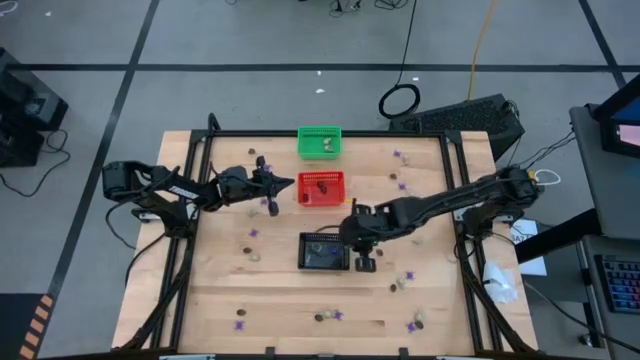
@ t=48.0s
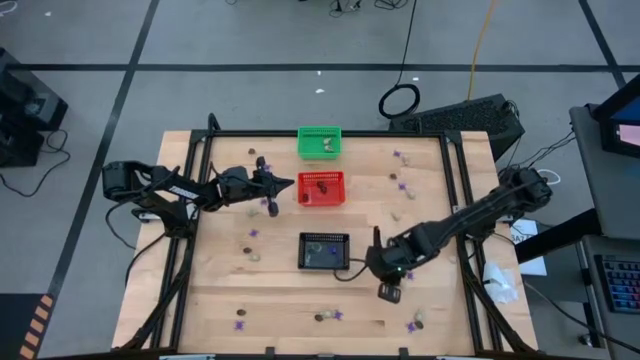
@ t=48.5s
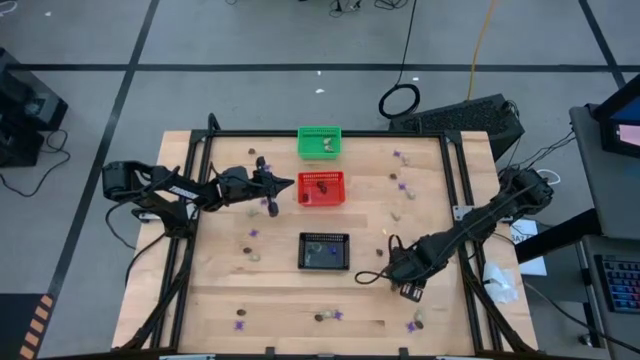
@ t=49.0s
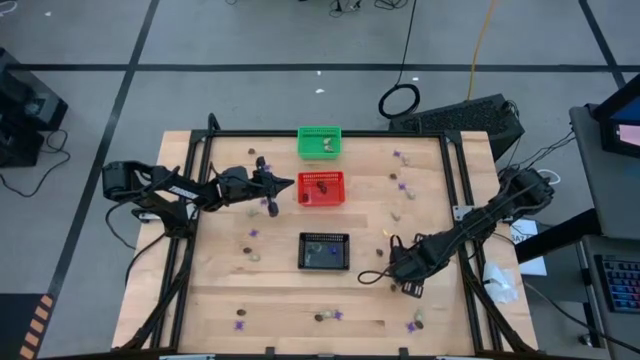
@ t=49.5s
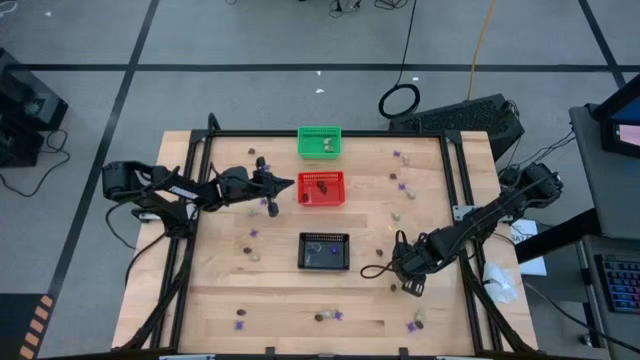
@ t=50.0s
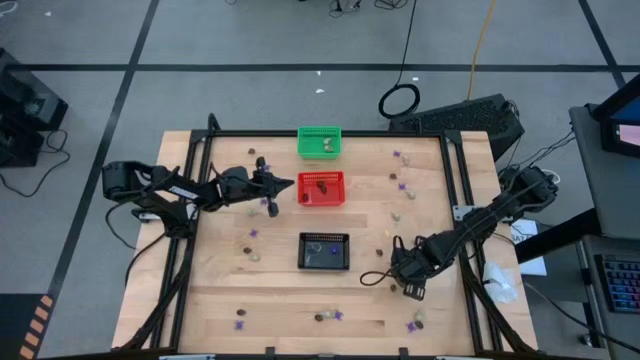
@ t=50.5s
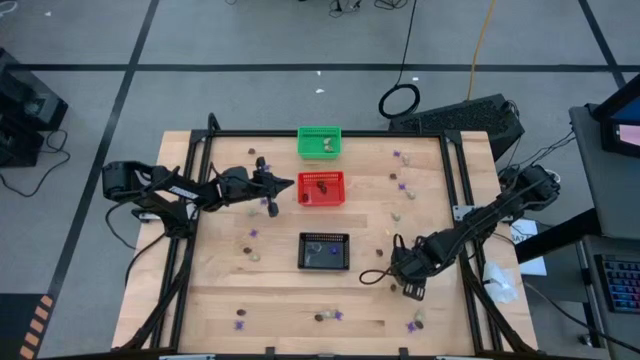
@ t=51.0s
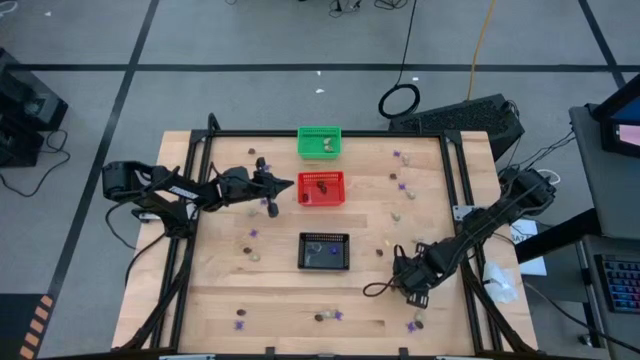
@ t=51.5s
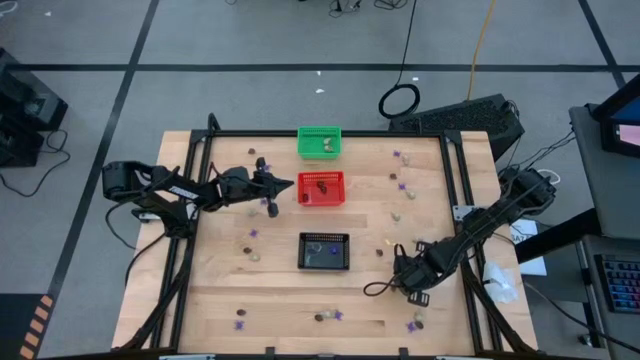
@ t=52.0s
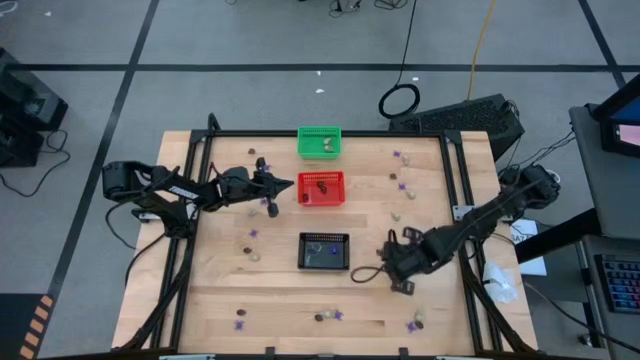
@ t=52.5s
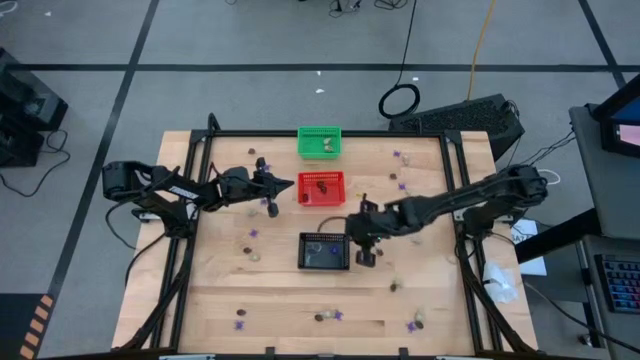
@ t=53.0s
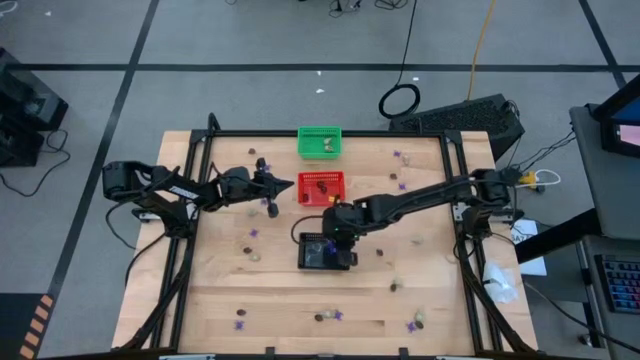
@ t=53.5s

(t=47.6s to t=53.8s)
Task: Sort Halloween decoration
Put the violet spider toy into the black basket

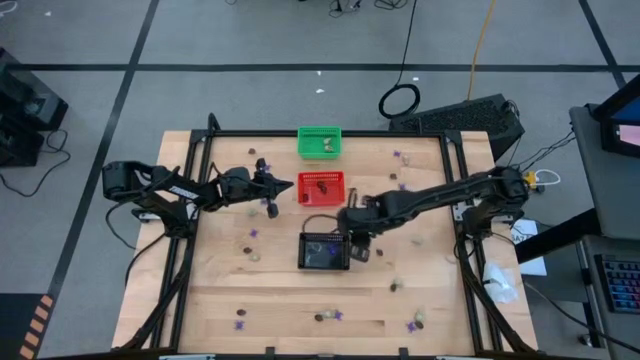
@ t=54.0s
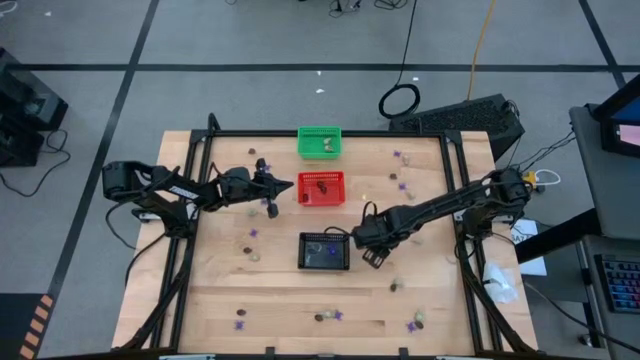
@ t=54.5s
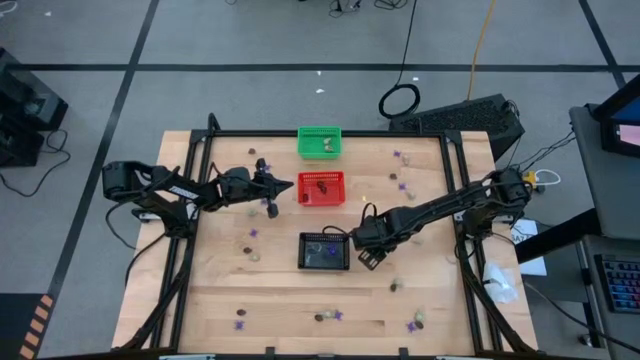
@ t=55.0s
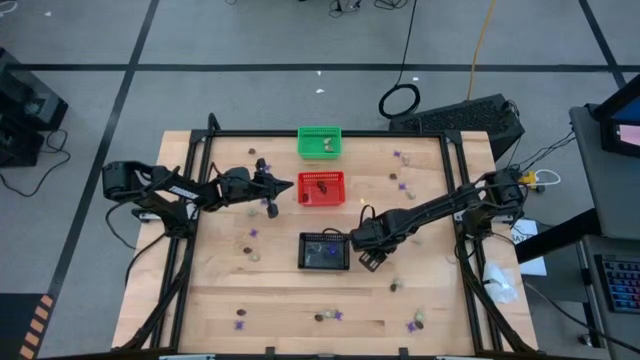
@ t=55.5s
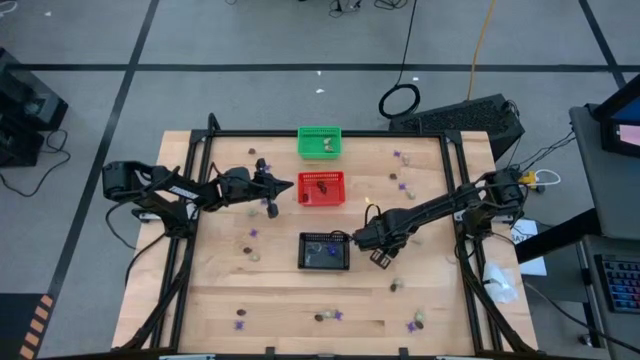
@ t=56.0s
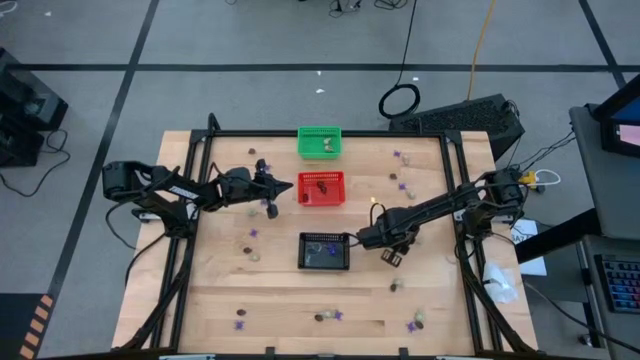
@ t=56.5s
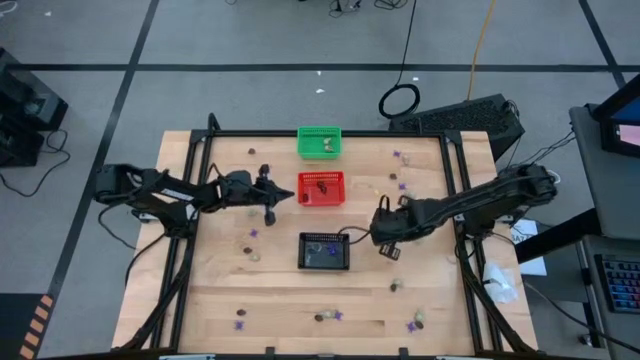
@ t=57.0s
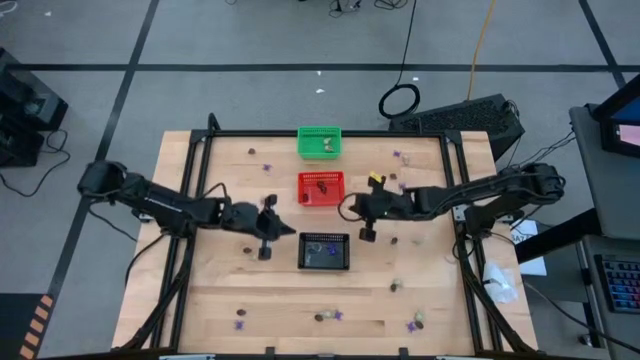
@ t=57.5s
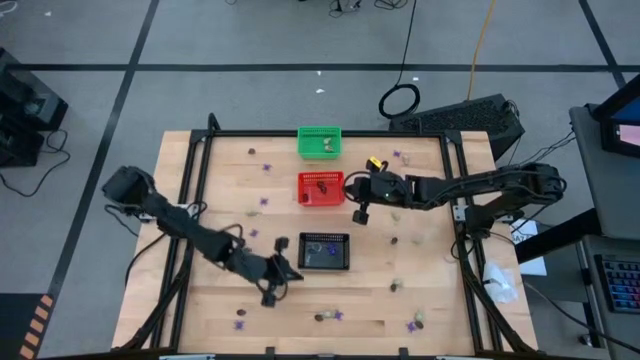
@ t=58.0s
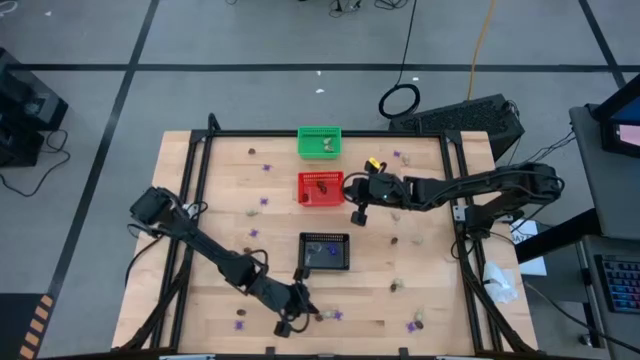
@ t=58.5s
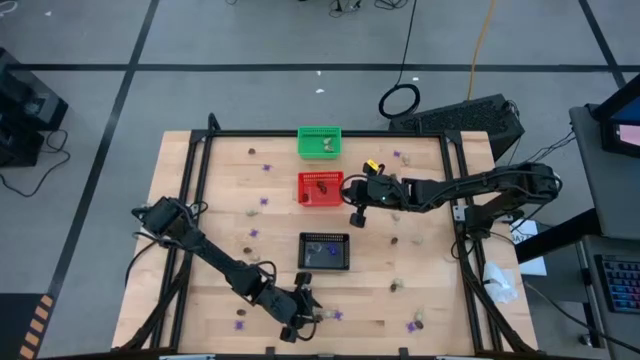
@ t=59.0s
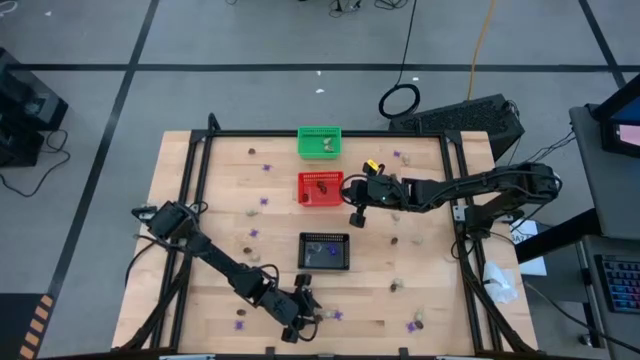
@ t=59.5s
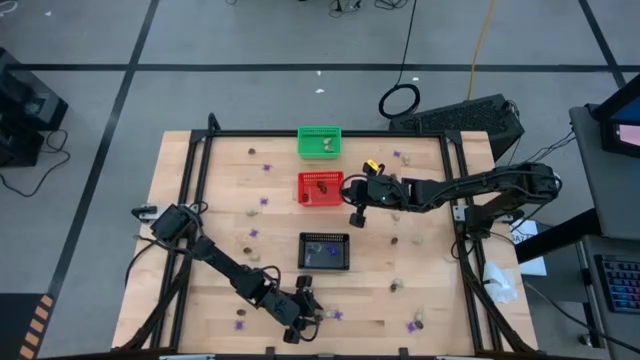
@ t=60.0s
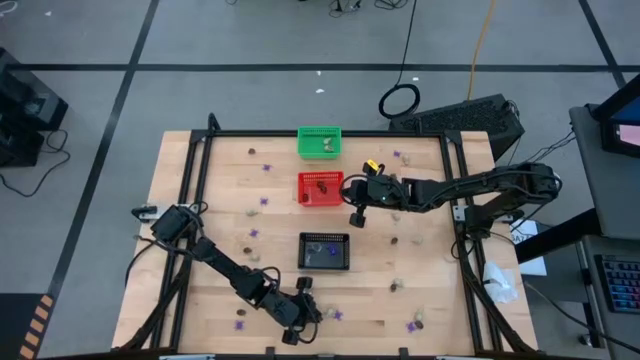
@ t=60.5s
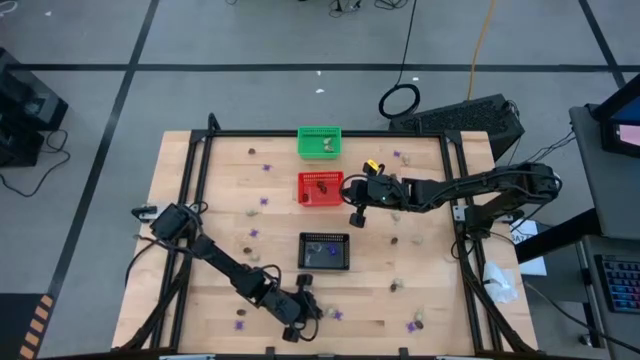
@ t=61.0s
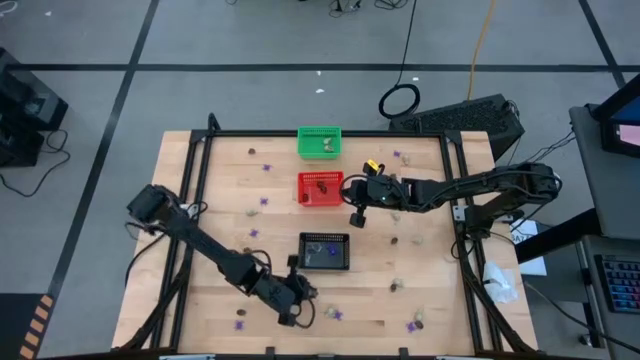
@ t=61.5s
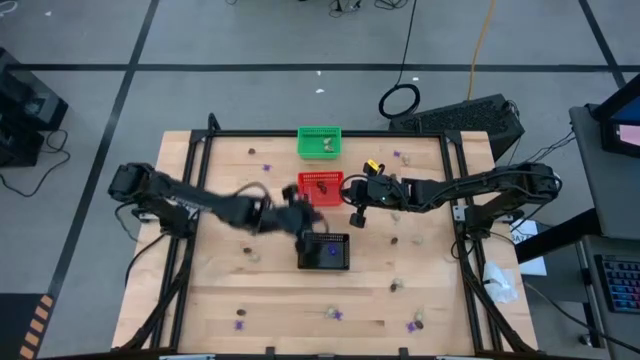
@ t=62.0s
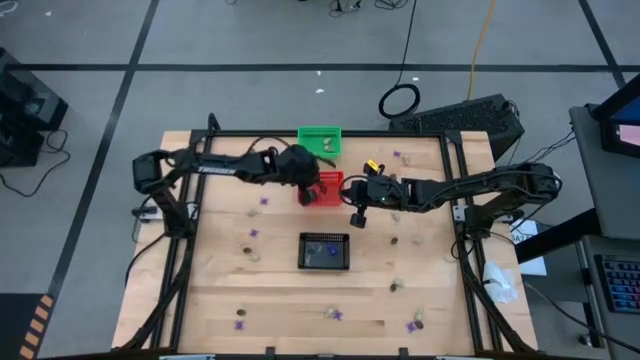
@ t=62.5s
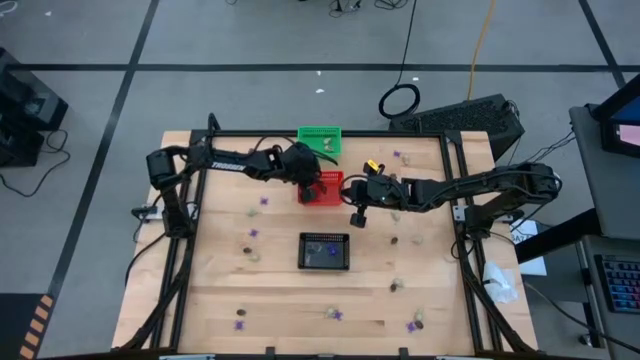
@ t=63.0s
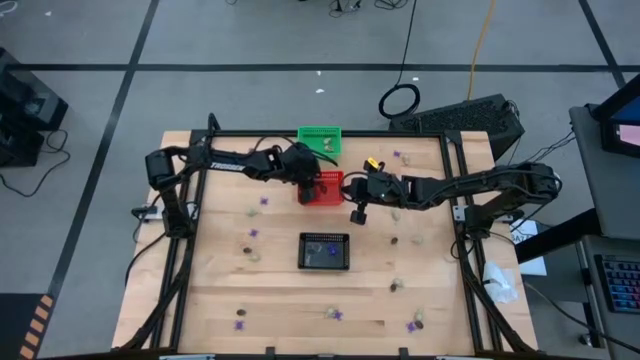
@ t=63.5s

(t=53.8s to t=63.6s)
Put the black skull toy into the red basket

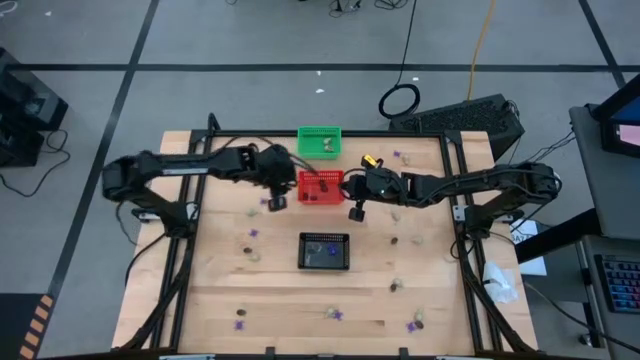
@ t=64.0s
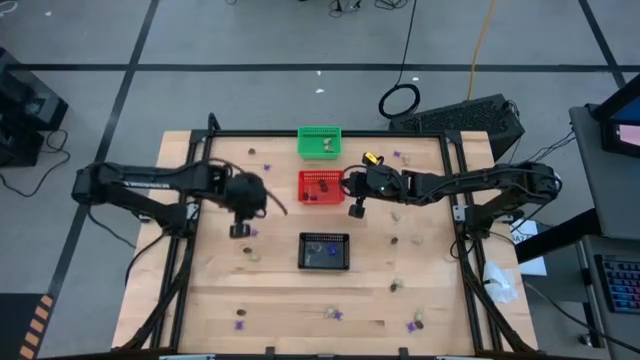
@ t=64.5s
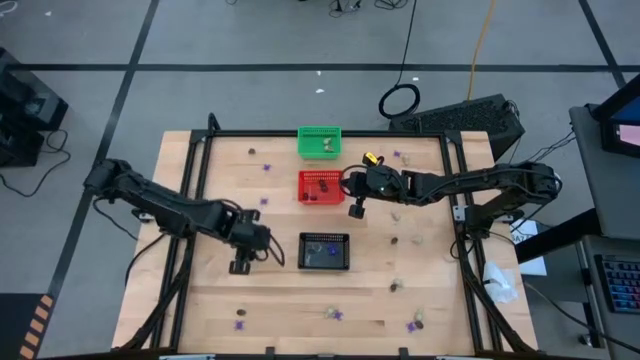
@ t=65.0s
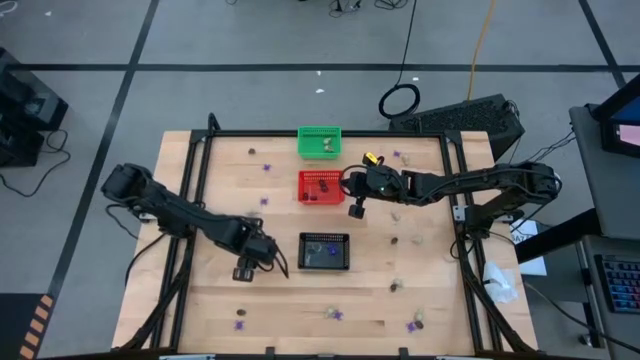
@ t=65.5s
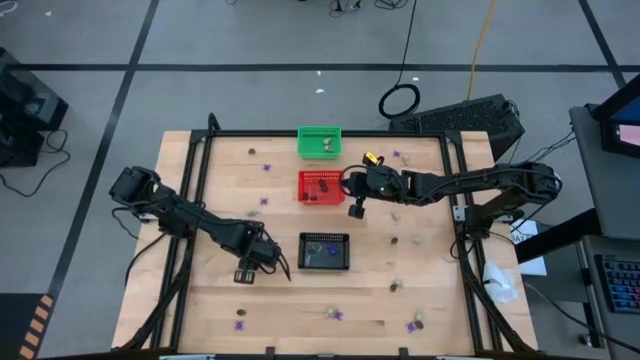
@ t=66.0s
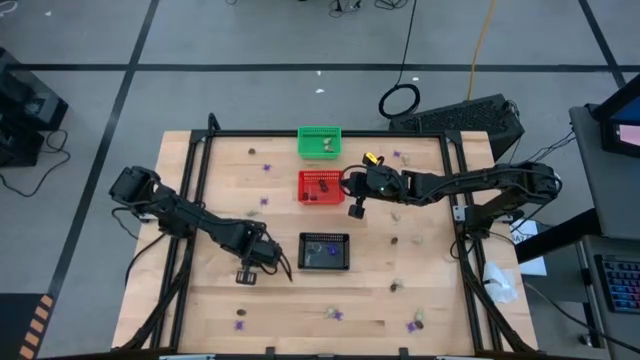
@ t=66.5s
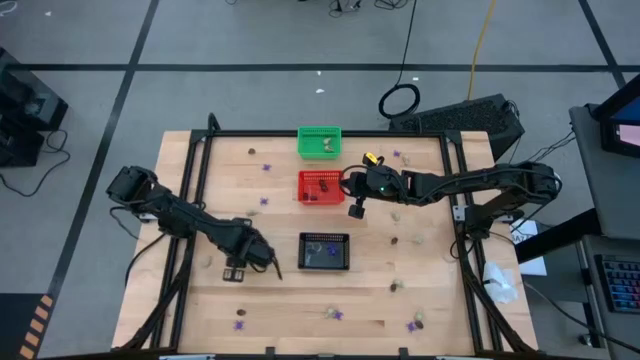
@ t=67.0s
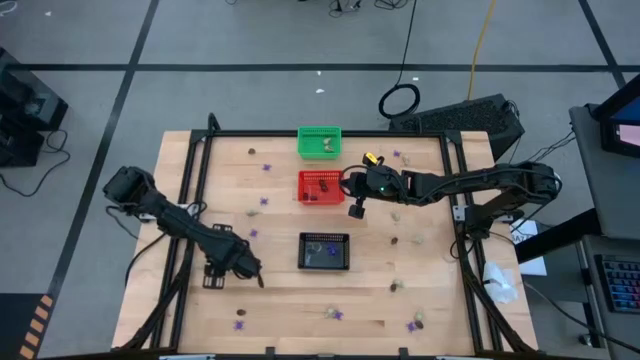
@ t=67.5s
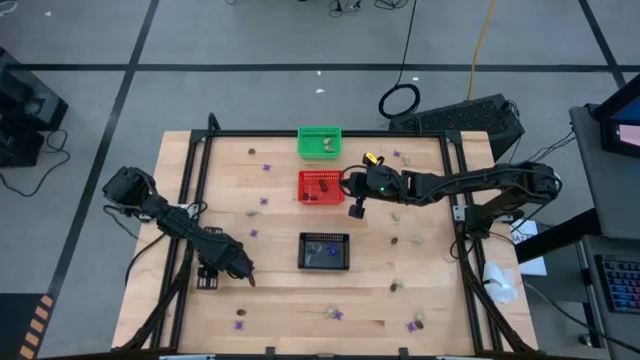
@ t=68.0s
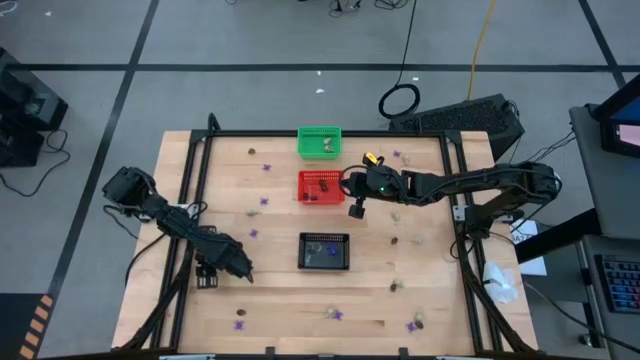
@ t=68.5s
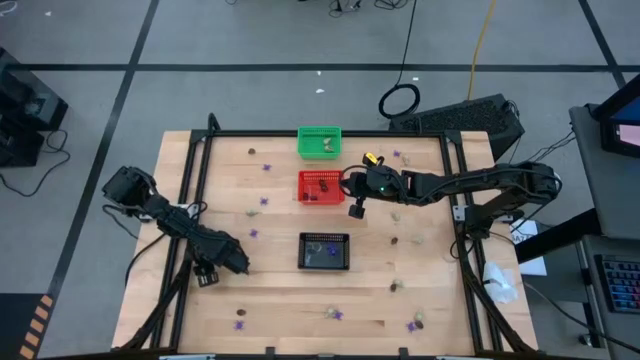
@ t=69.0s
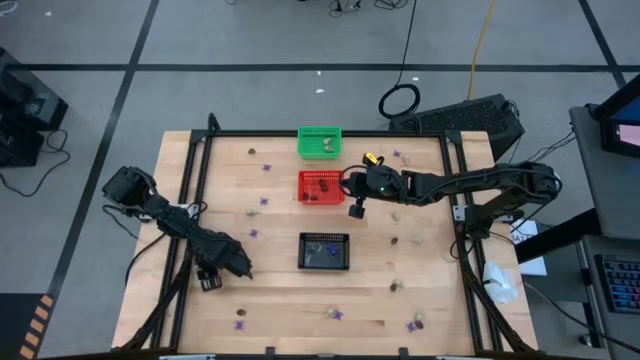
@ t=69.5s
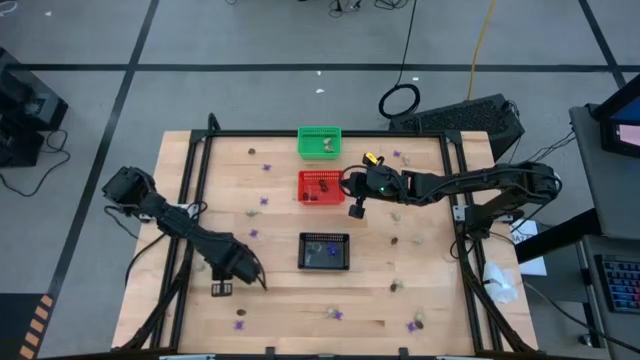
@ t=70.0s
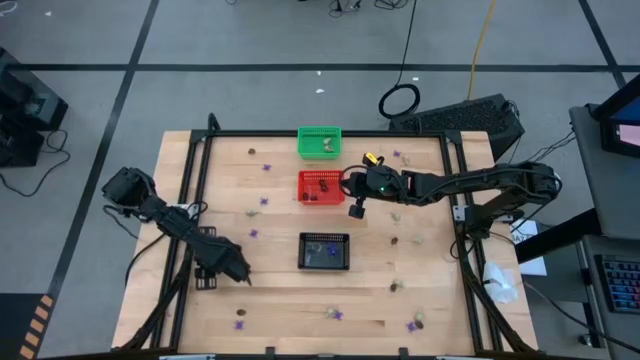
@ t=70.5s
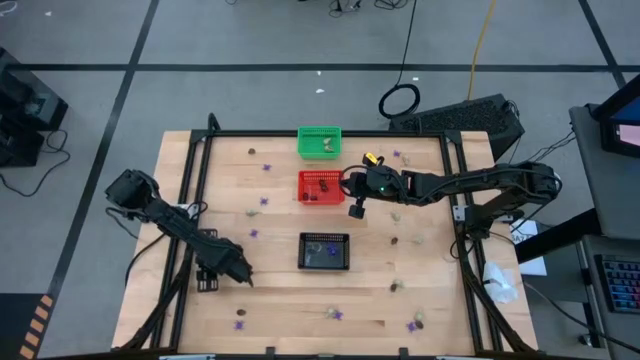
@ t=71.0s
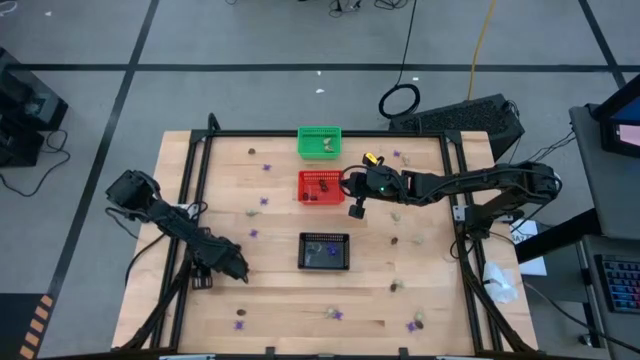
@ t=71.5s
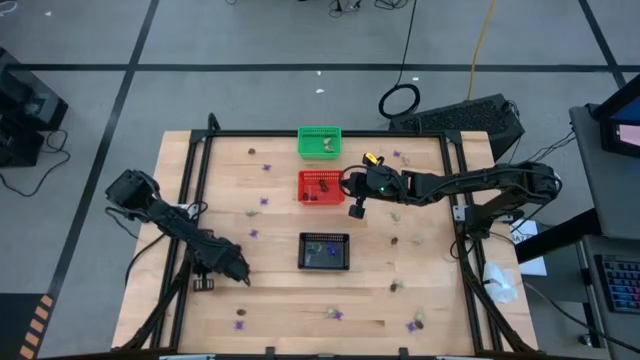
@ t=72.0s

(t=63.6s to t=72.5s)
Put the white skull toy into the green basket
